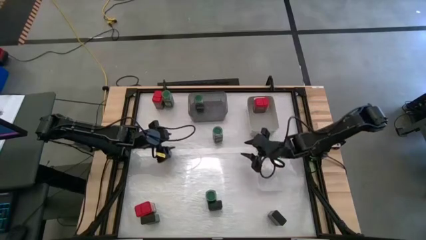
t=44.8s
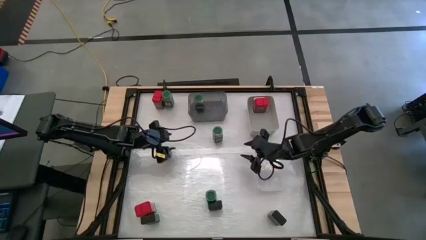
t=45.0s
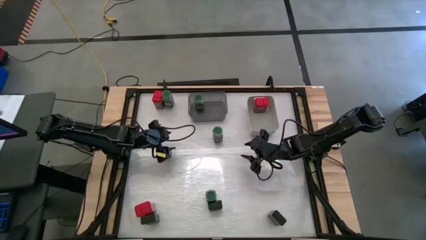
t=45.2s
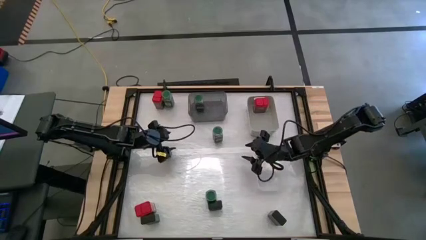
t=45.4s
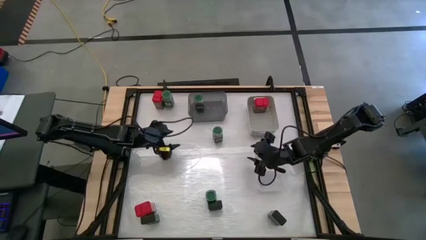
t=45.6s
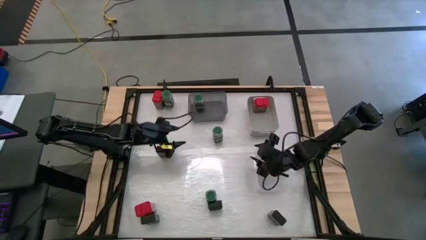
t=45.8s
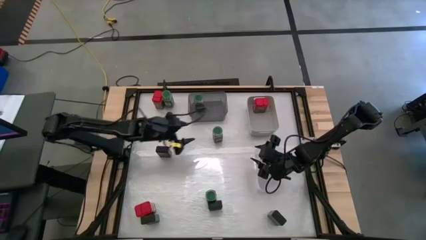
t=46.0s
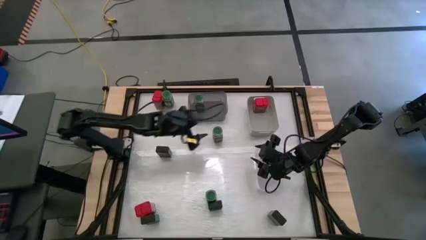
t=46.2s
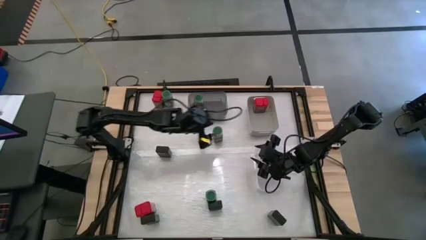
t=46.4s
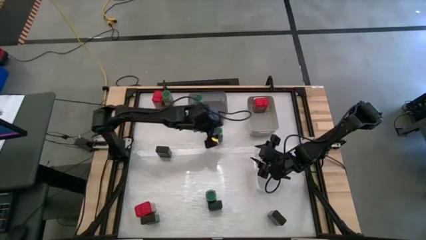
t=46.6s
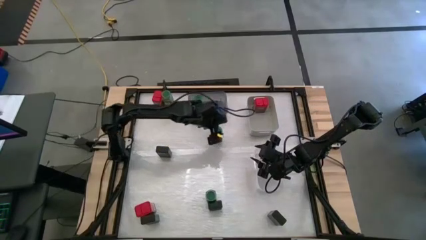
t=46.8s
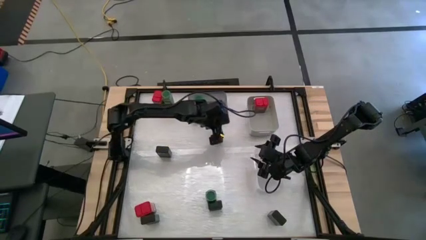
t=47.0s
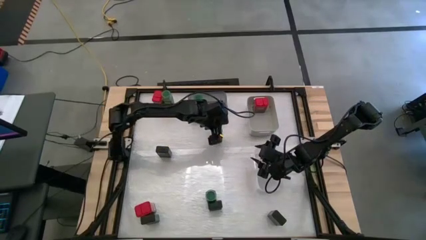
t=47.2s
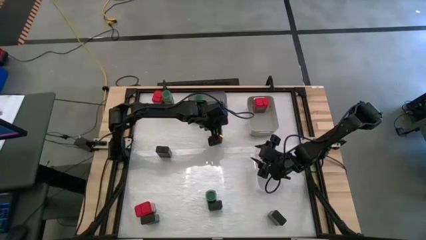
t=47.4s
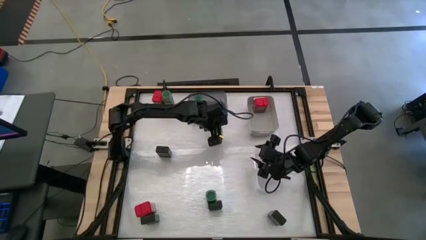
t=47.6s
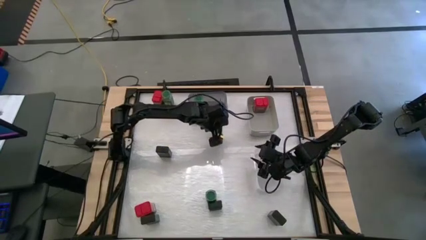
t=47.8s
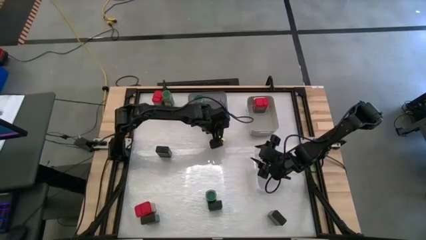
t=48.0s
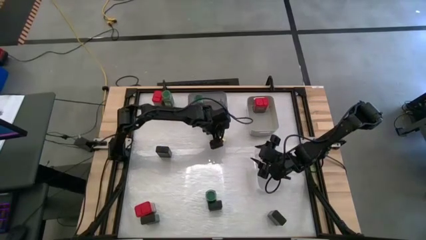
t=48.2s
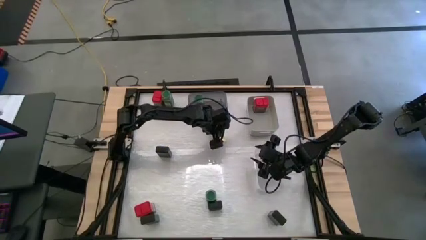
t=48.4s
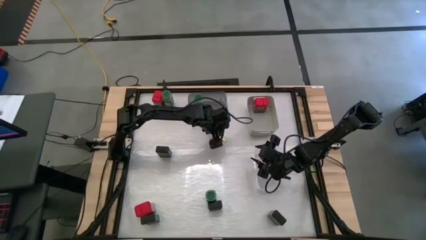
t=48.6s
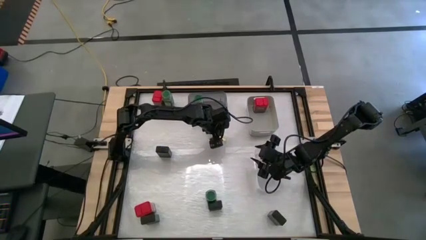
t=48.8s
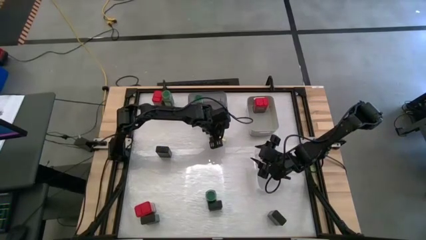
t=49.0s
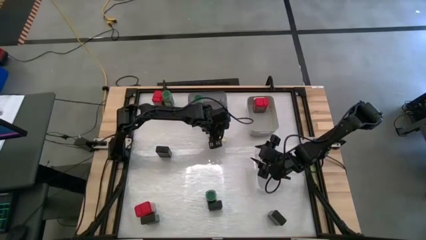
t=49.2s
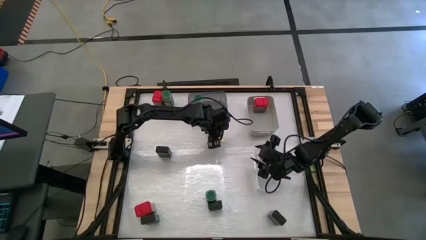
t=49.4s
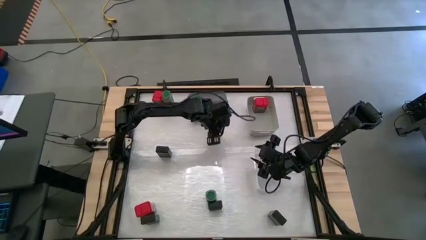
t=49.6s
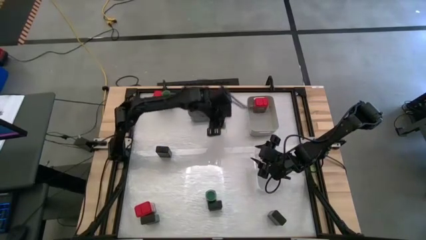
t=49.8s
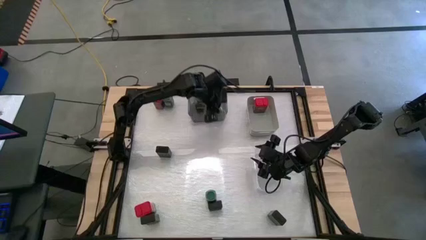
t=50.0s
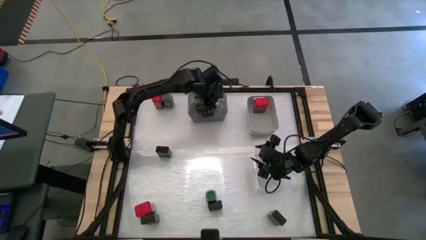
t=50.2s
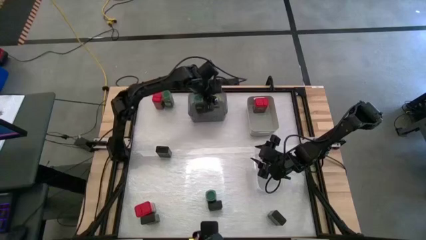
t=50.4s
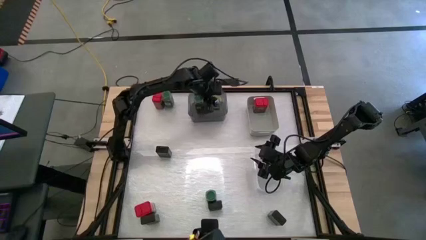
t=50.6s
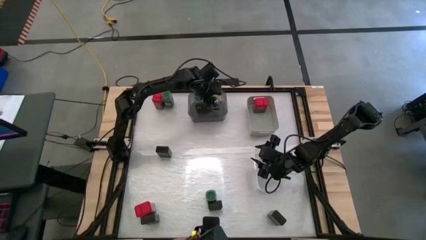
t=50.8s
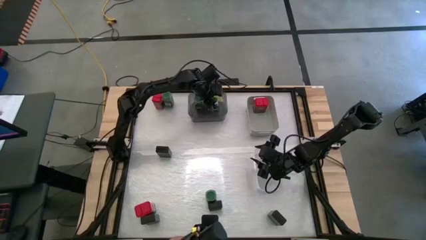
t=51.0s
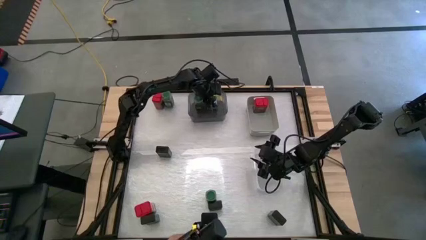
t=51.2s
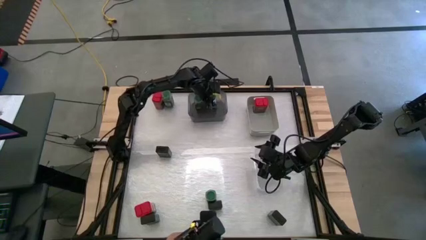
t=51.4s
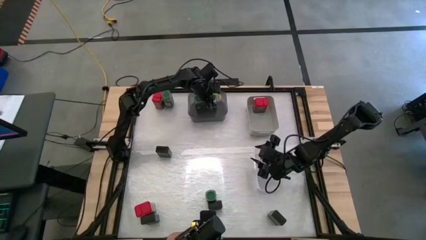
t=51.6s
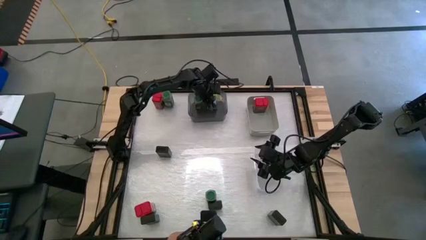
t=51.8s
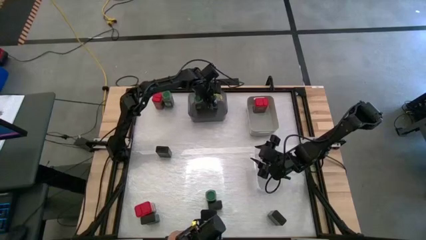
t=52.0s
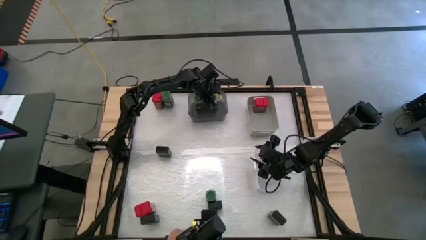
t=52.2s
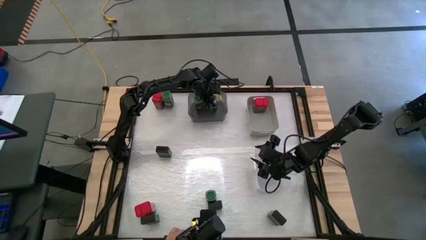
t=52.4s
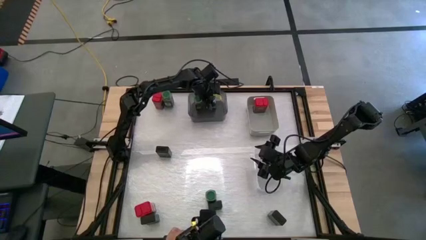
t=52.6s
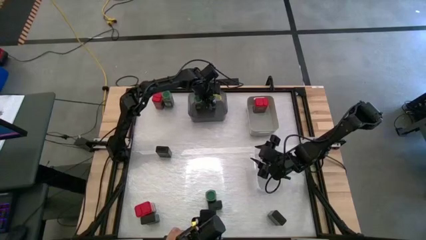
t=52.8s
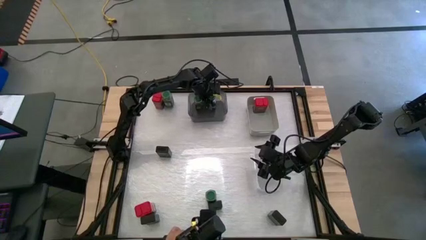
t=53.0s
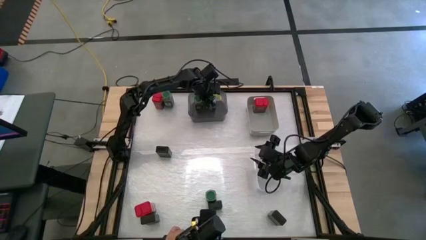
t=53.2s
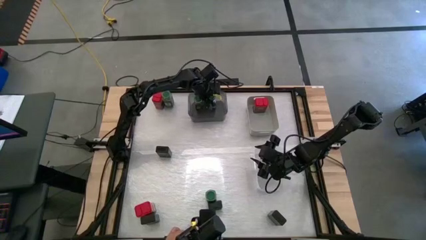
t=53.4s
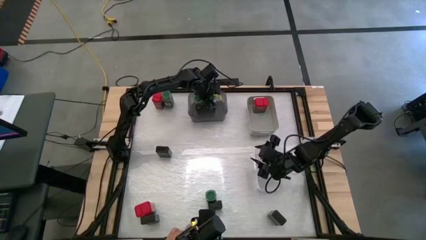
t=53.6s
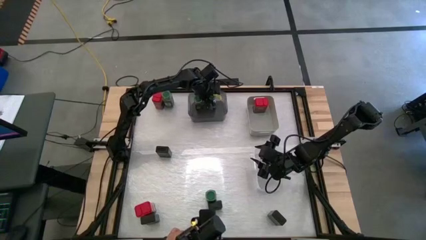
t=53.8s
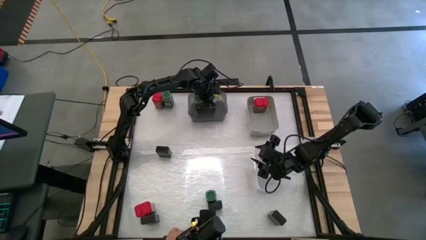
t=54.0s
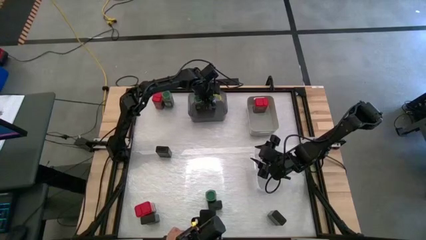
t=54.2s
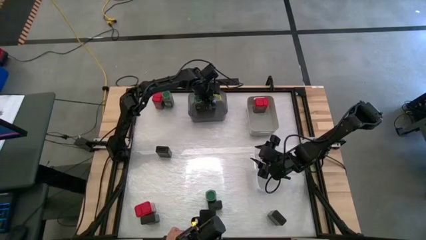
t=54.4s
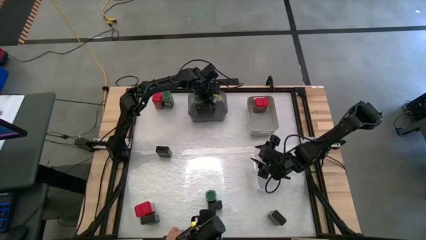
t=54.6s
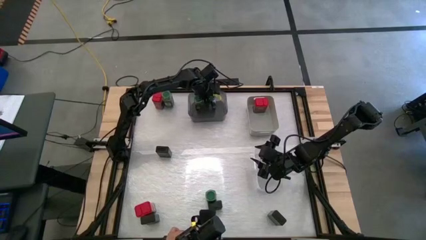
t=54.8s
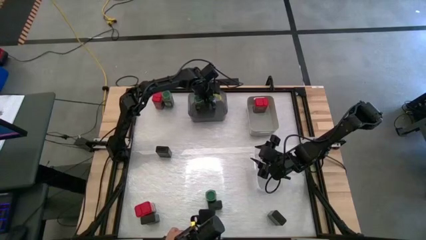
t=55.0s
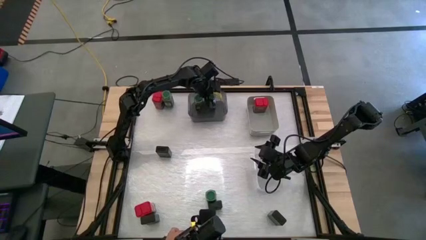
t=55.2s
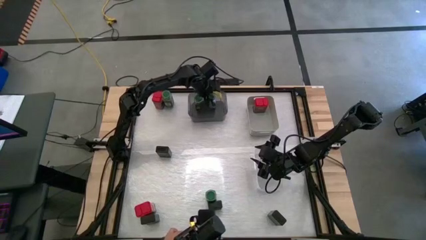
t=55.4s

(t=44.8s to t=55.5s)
Task: Sort spices by type
Put the center green seasoning bottle into the black bin
